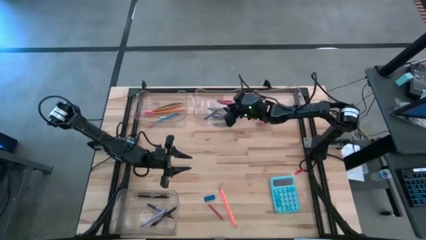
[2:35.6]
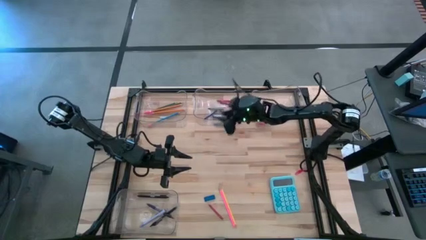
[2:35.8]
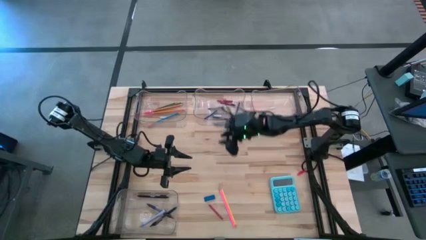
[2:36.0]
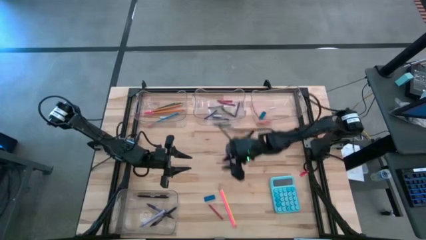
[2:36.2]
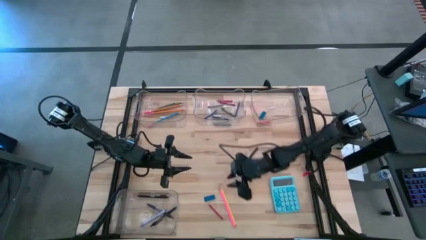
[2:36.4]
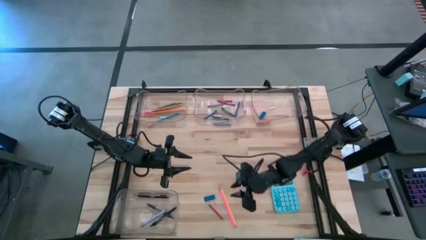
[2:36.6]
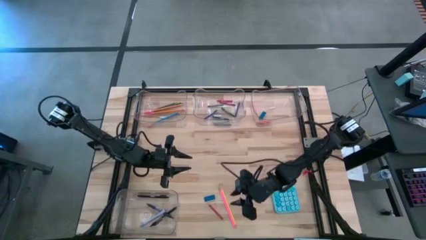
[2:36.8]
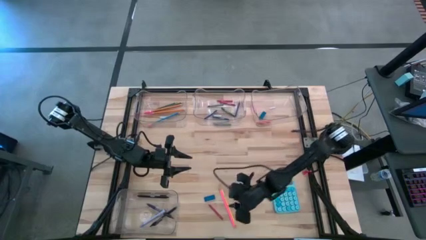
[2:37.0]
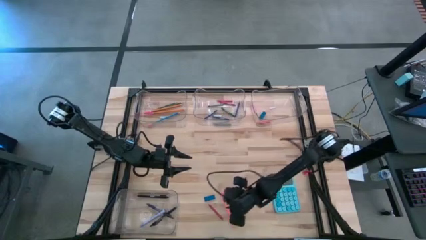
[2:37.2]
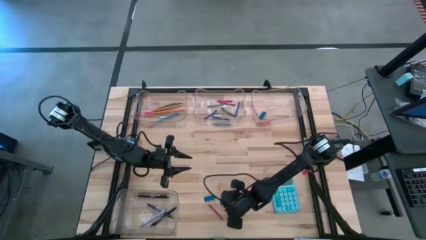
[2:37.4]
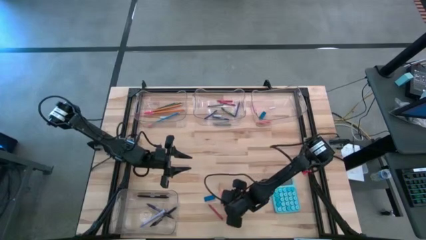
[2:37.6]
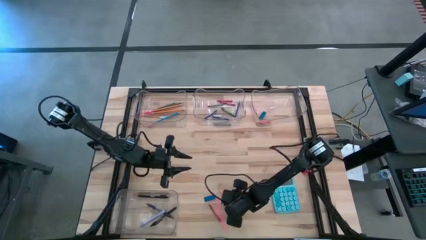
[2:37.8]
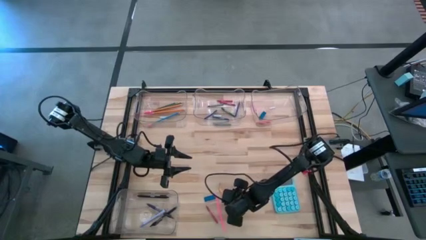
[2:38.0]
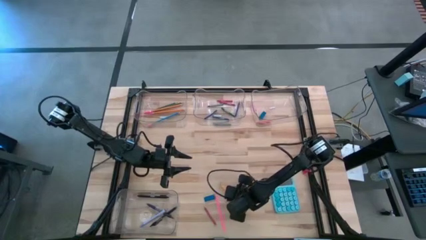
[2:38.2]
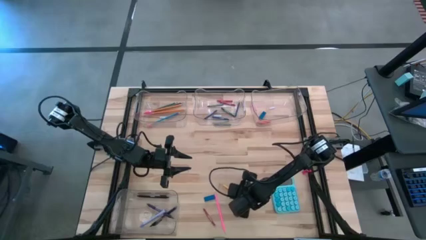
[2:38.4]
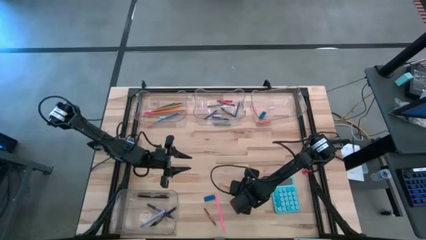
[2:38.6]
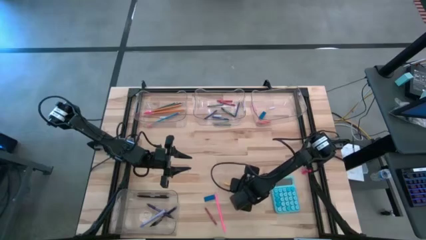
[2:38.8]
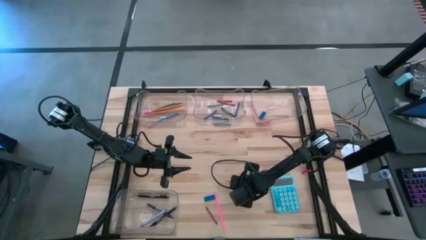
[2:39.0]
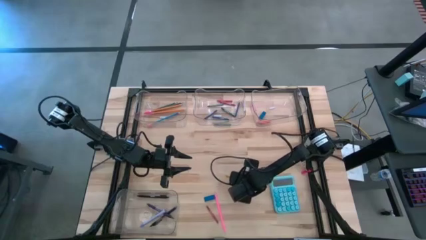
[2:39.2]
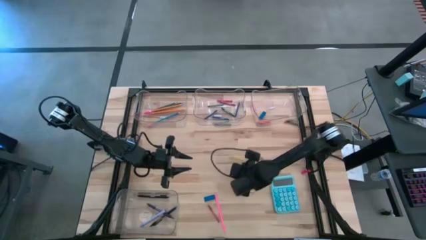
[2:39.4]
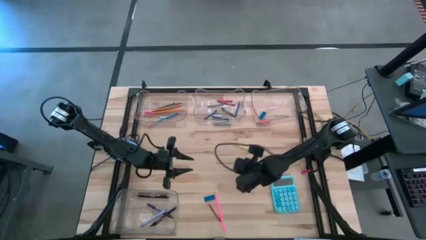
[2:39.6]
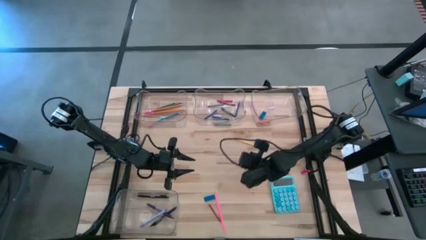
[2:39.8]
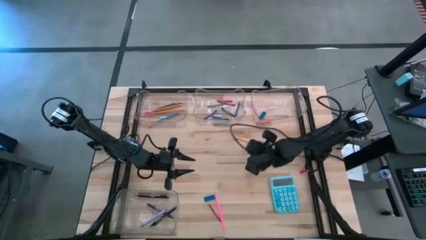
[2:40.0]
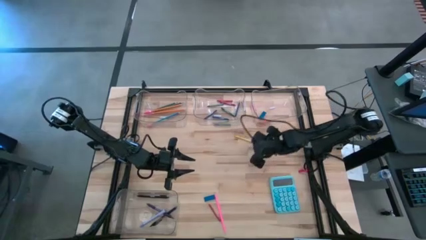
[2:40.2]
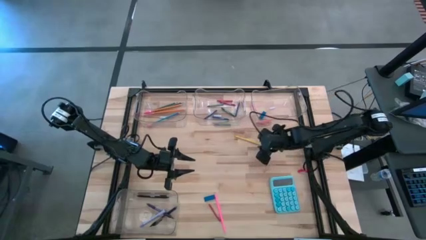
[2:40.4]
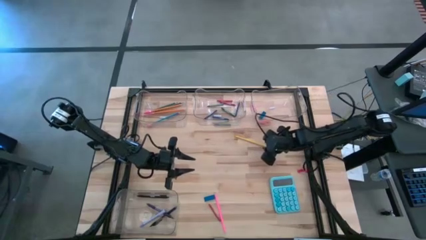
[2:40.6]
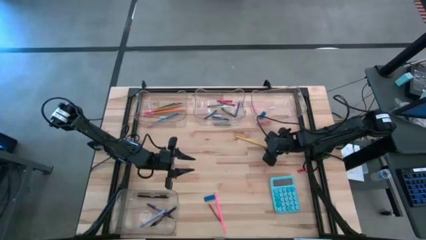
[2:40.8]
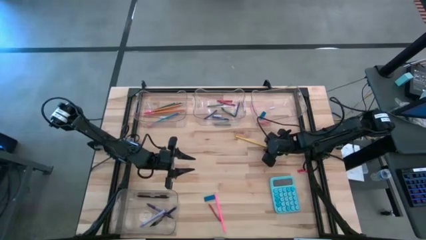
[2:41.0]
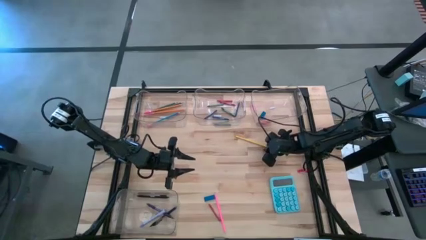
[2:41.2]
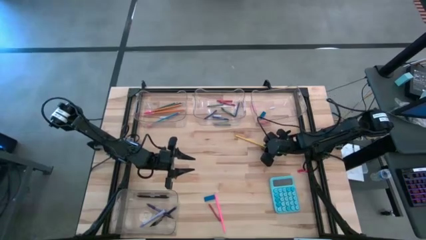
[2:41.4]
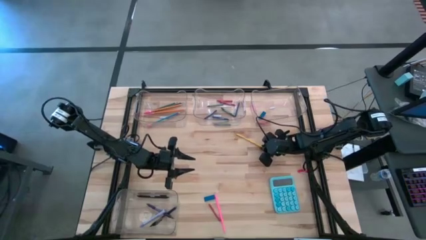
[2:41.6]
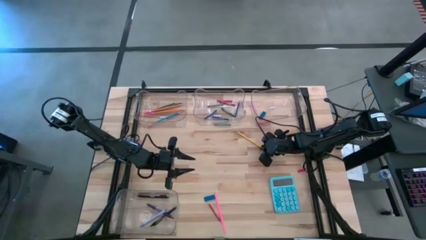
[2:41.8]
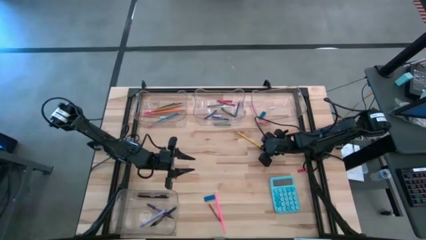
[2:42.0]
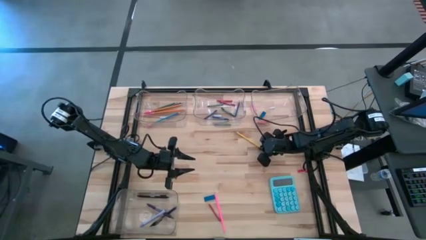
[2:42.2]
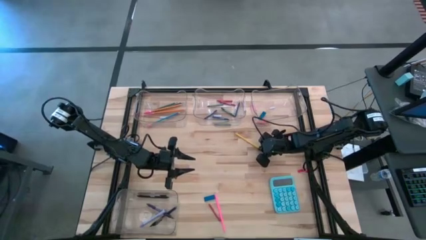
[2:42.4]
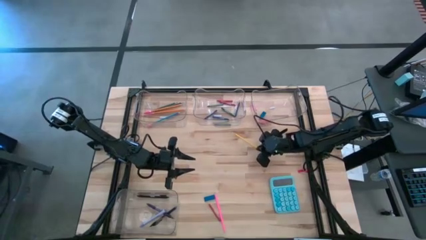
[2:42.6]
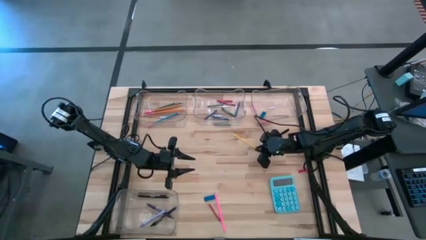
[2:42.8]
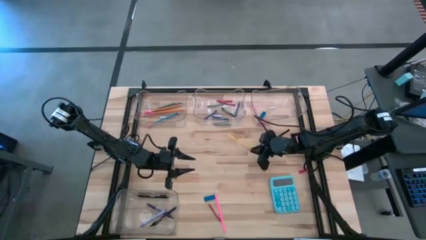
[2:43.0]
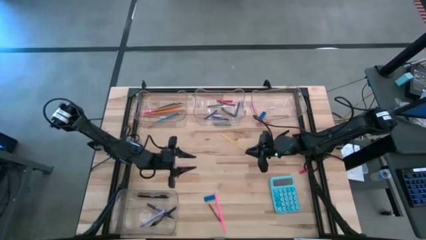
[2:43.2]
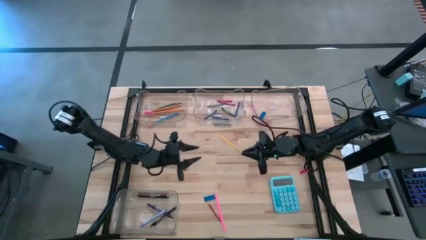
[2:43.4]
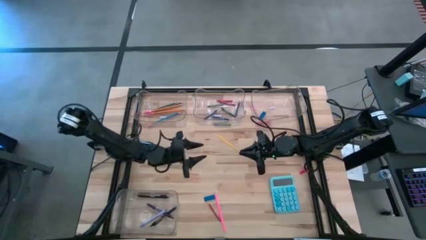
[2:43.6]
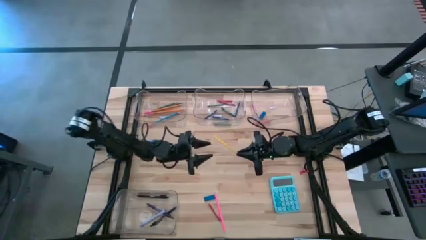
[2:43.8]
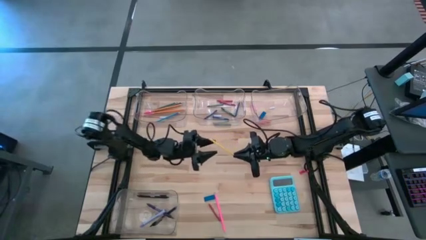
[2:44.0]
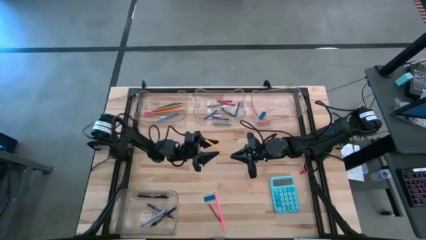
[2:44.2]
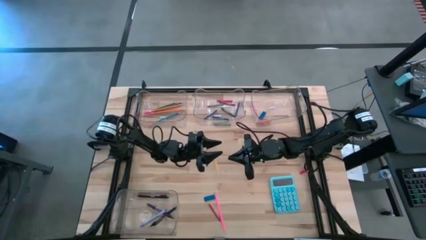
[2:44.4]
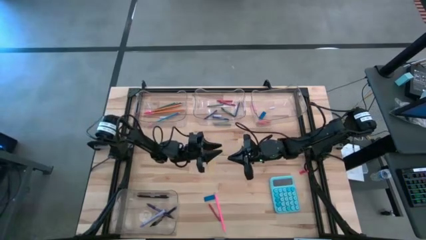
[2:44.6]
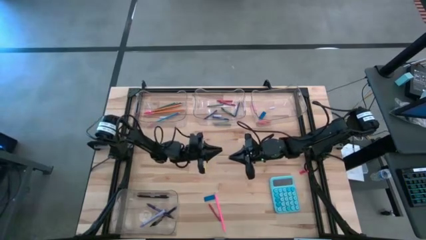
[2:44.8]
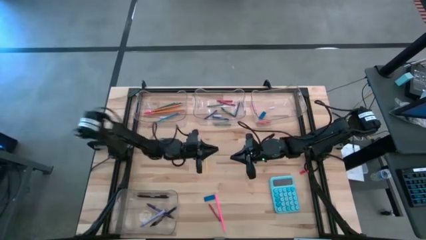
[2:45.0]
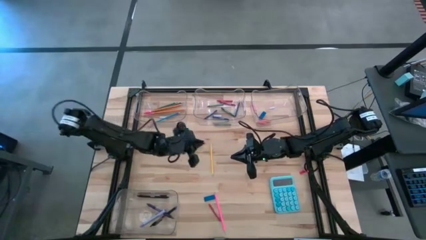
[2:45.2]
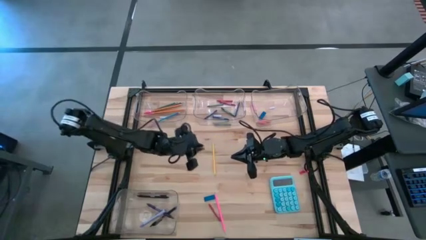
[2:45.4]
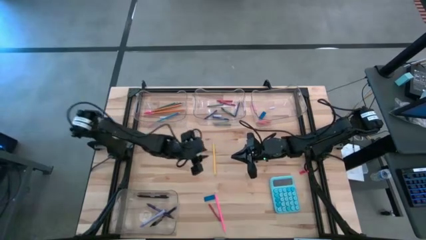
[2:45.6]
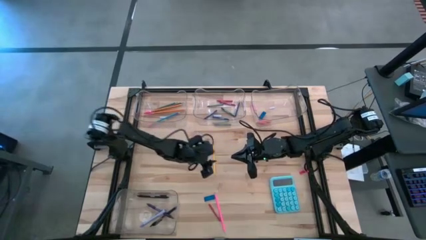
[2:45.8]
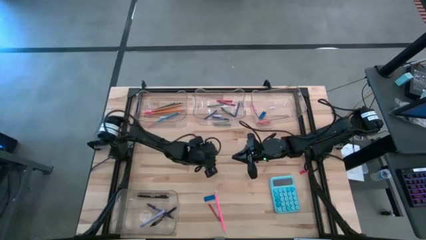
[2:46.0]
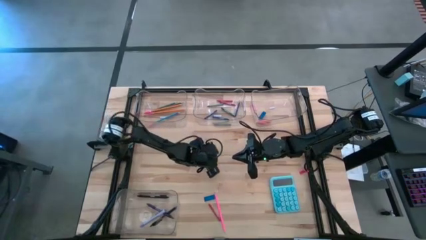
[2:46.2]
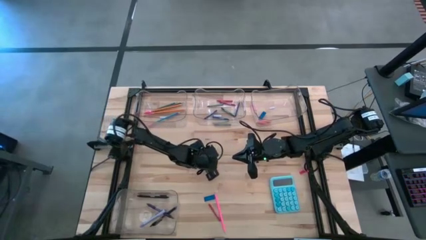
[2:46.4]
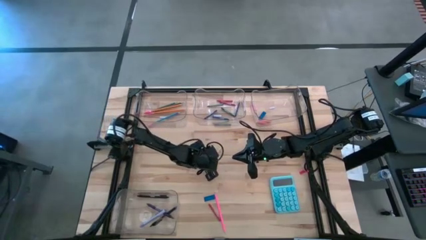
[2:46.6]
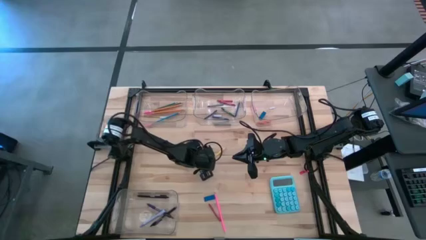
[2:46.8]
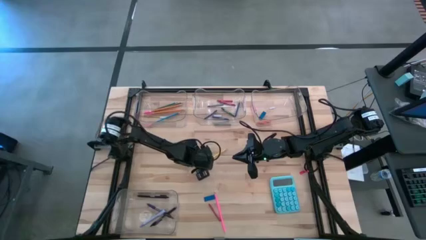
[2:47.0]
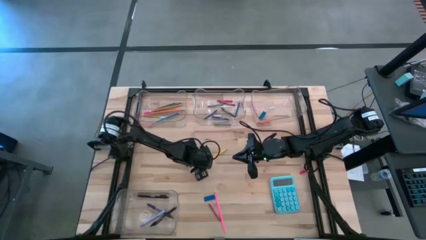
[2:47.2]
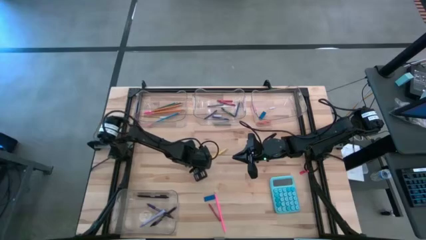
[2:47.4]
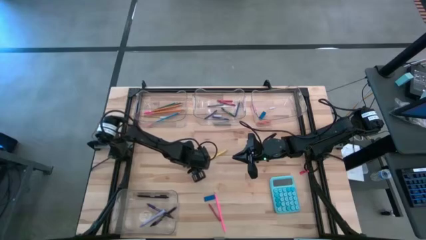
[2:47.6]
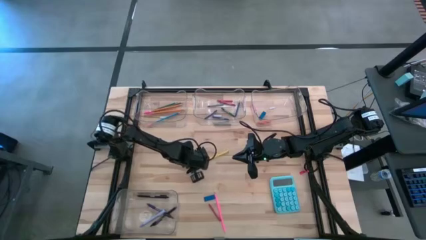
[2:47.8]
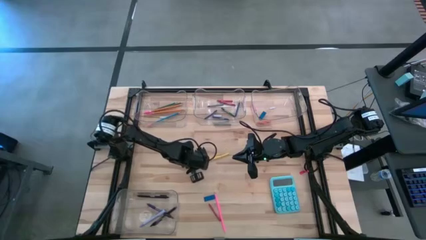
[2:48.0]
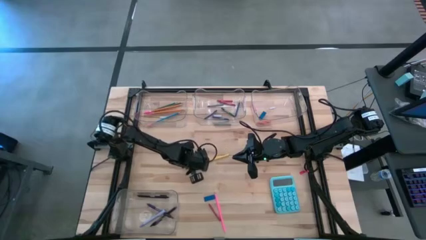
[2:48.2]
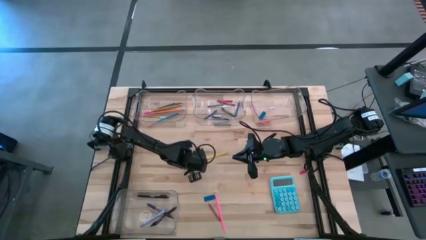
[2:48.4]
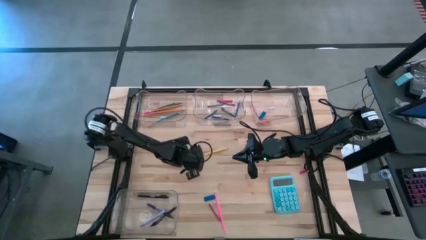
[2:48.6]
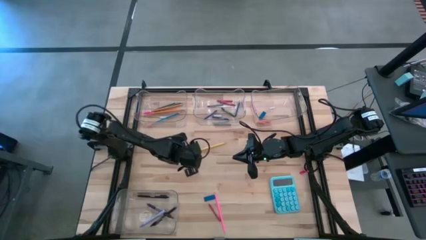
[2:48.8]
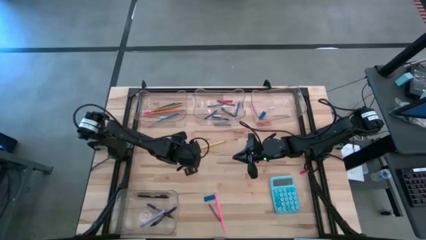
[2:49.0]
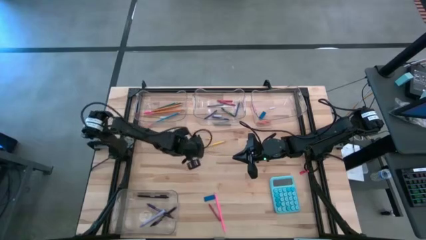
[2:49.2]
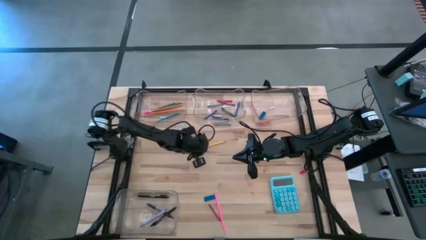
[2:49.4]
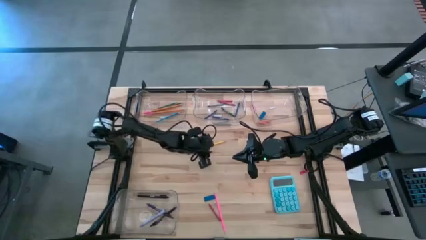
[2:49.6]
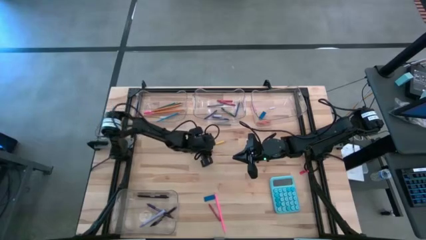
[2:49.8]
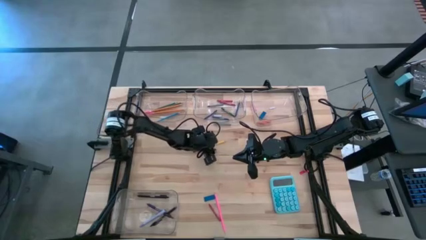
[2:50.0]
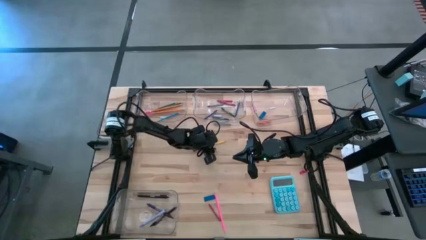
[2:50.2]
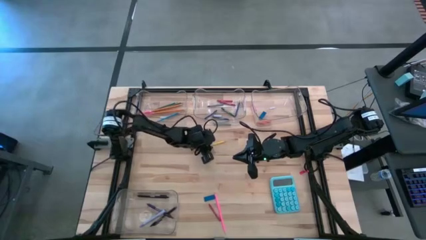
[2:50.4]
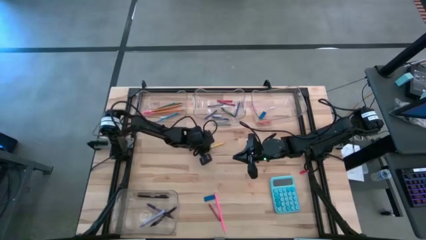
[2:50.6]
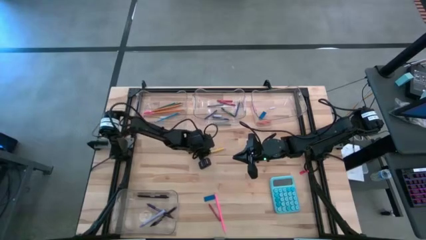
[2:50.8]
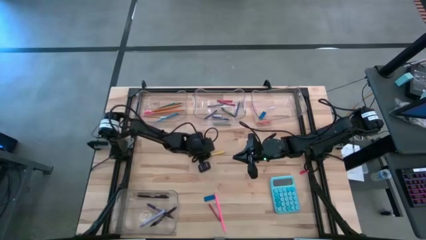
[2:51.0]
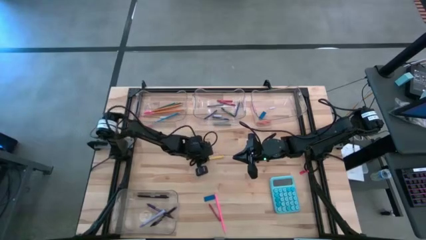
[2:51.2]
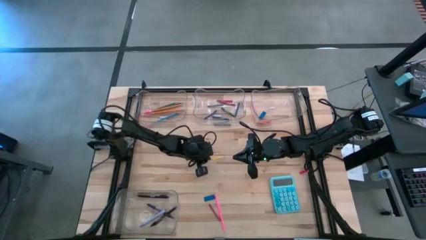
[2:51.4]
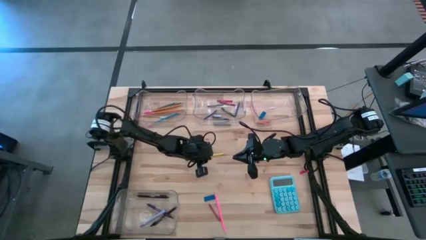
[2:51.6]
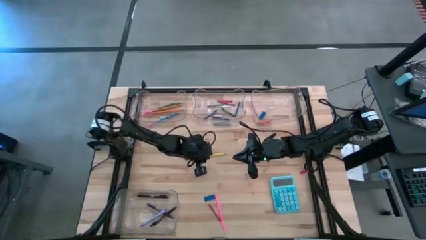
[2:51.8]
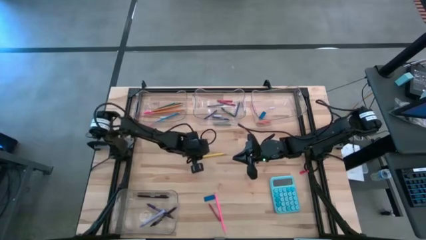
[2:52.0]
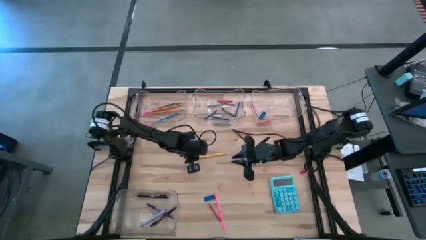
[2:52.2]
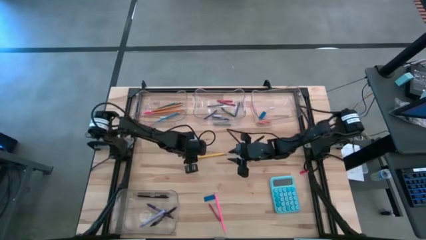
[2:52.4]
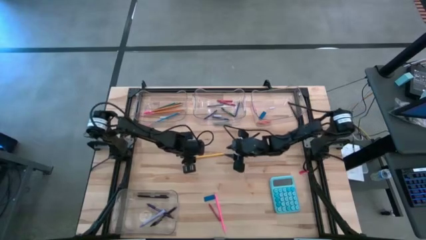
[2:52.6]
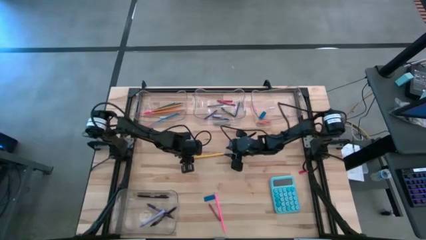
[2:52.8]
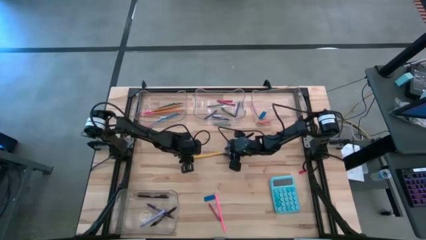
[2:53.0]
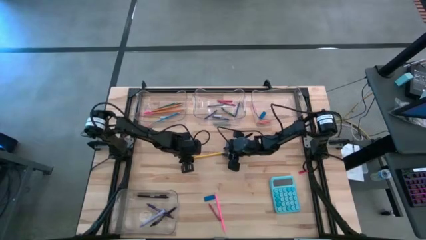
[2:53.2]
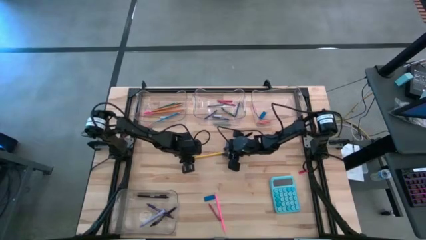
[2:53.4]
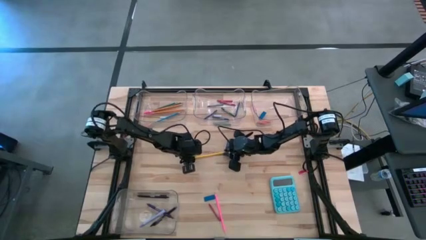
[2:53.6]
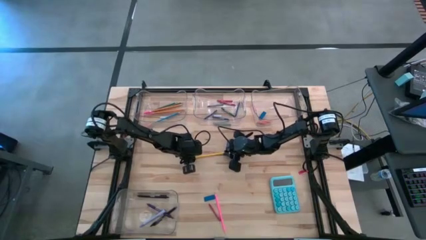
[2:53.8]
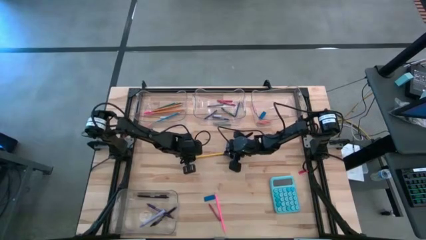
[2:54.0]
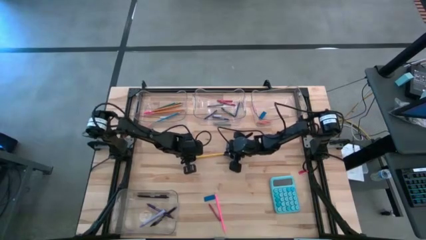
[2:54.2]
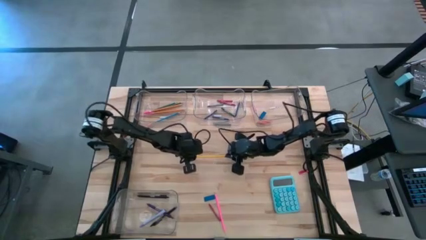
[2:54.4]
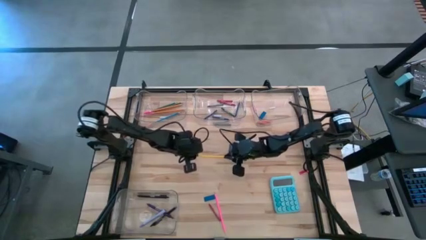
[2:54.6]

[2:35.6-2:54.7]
Task: Sort crayons/erasers/pens/pencils in bins
Put the yellow colored pencil into the top left transparent bin
